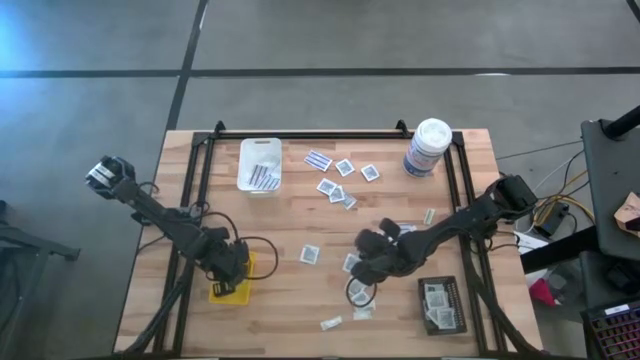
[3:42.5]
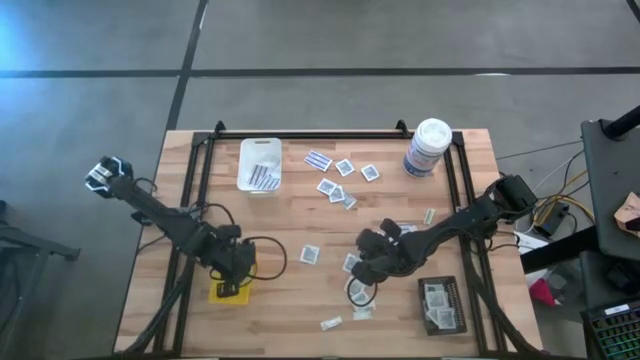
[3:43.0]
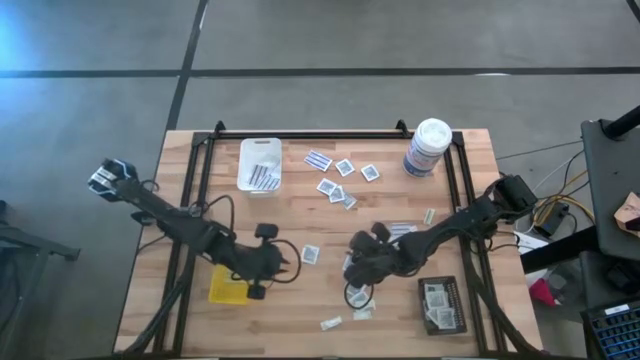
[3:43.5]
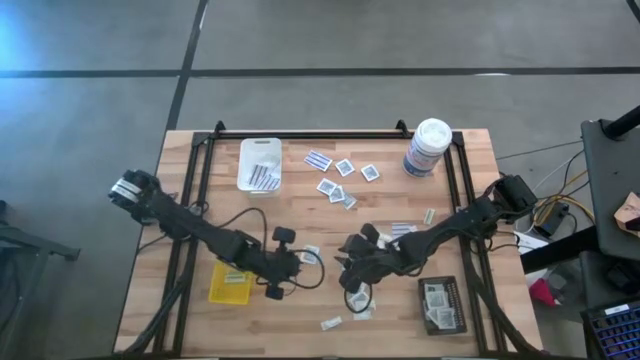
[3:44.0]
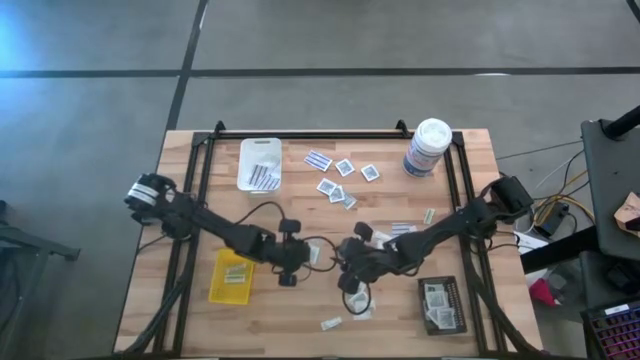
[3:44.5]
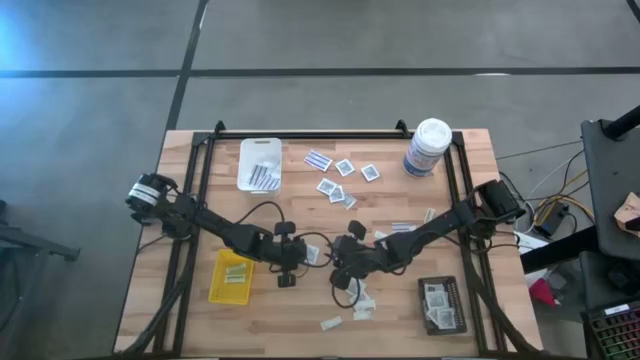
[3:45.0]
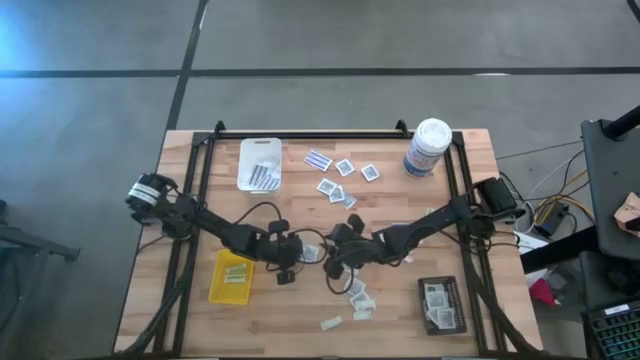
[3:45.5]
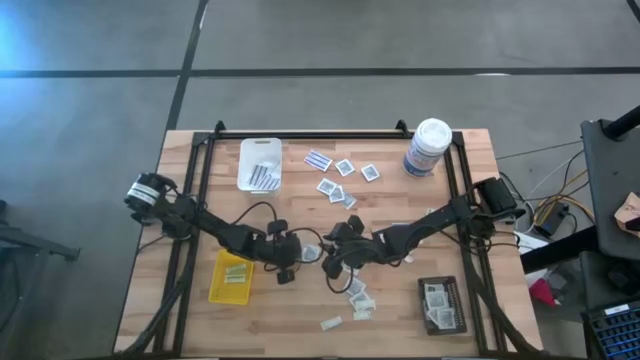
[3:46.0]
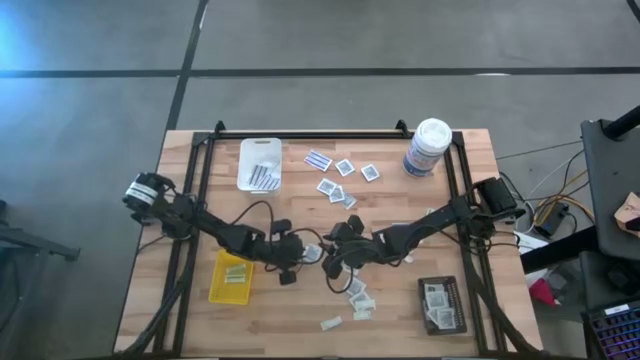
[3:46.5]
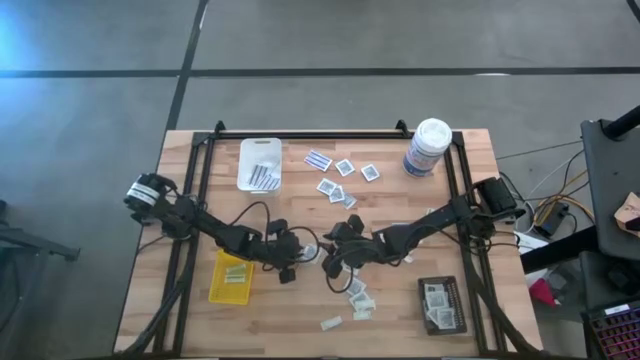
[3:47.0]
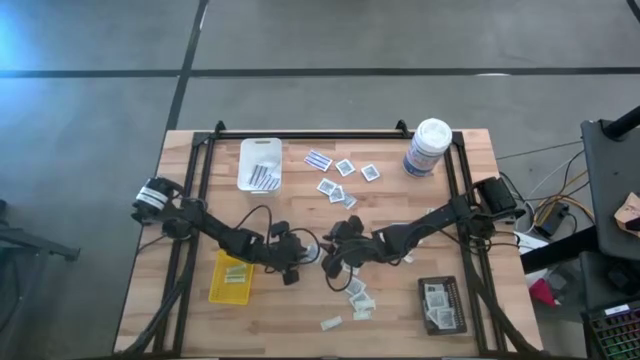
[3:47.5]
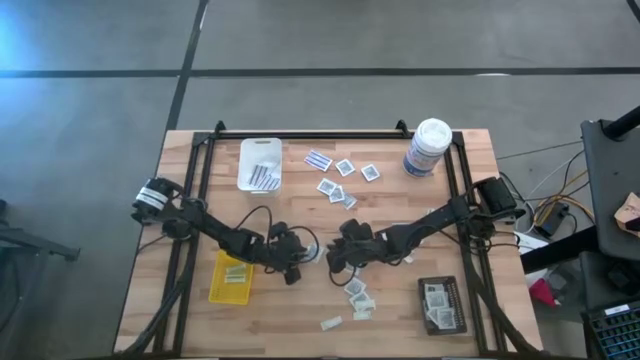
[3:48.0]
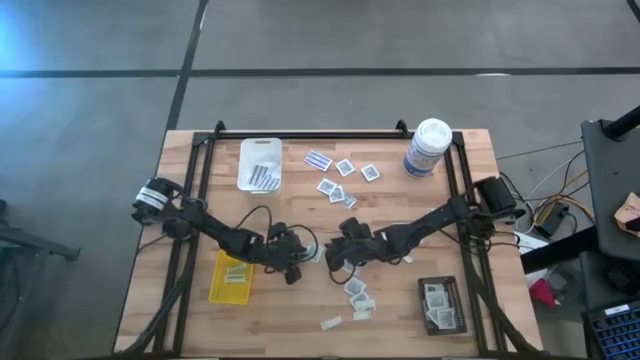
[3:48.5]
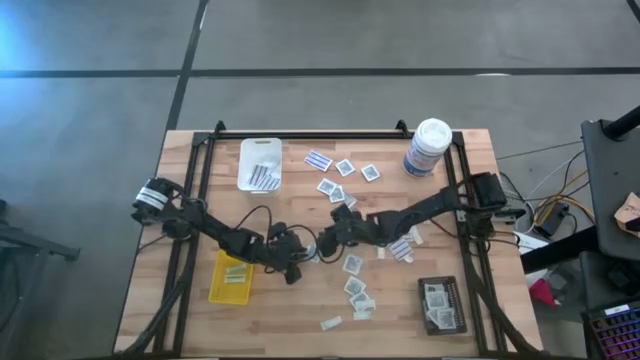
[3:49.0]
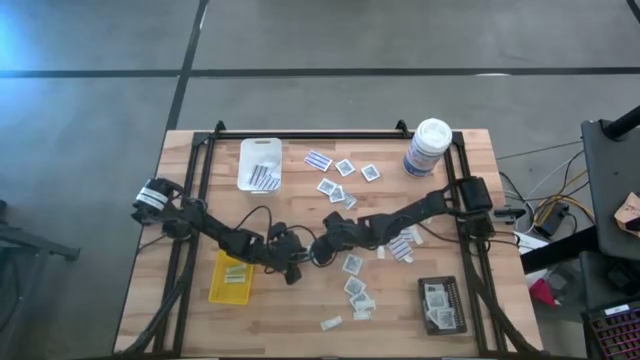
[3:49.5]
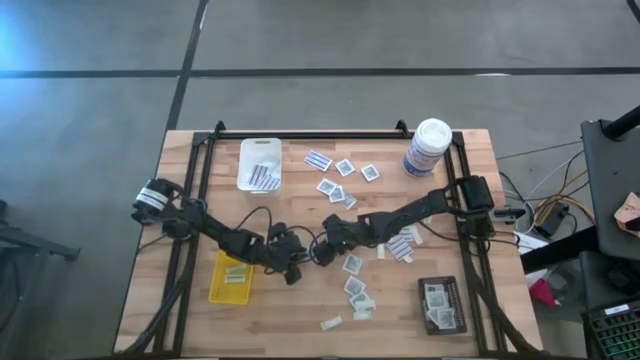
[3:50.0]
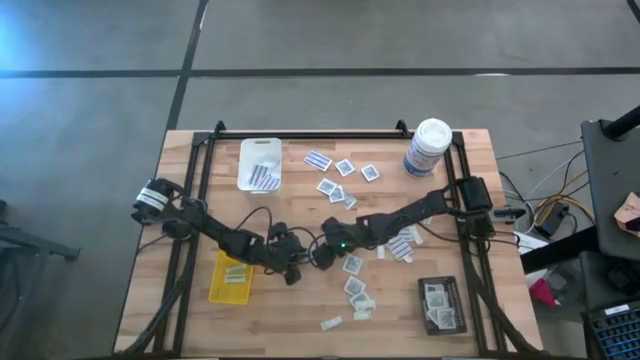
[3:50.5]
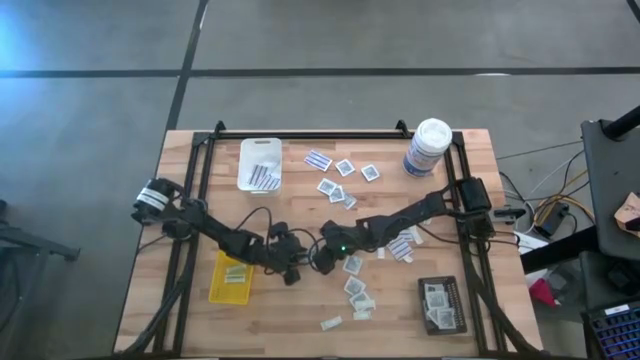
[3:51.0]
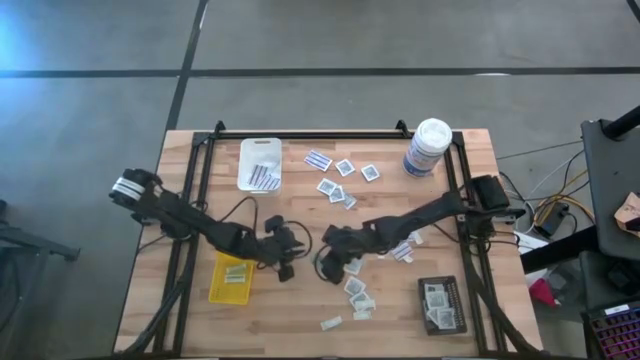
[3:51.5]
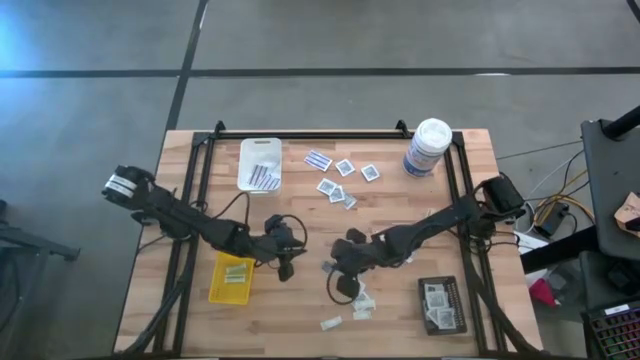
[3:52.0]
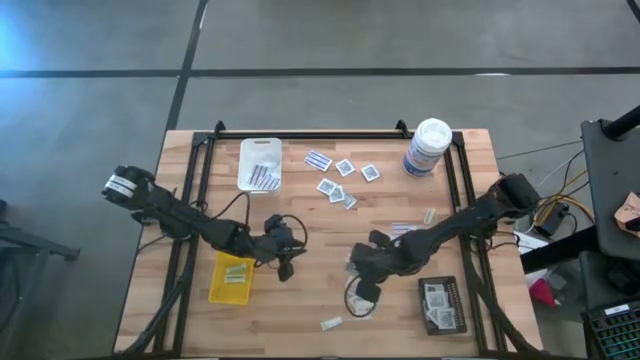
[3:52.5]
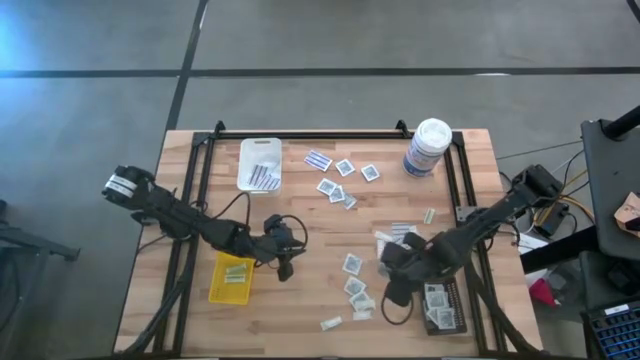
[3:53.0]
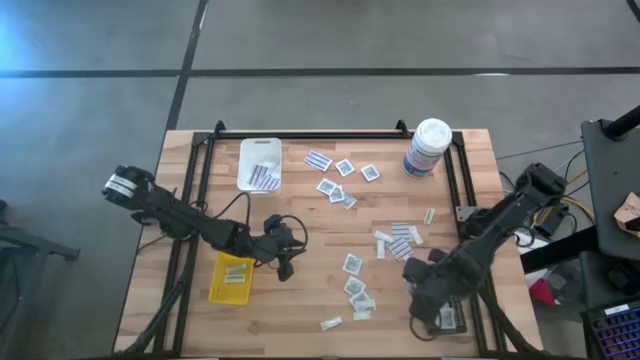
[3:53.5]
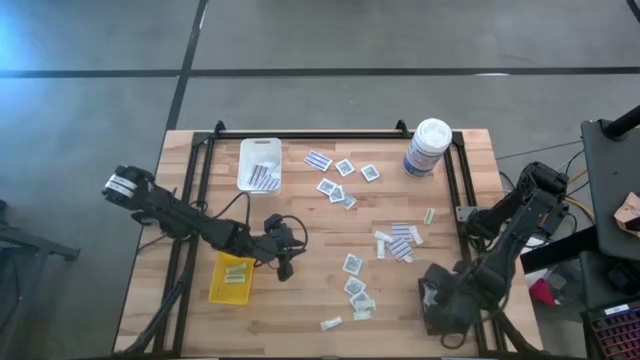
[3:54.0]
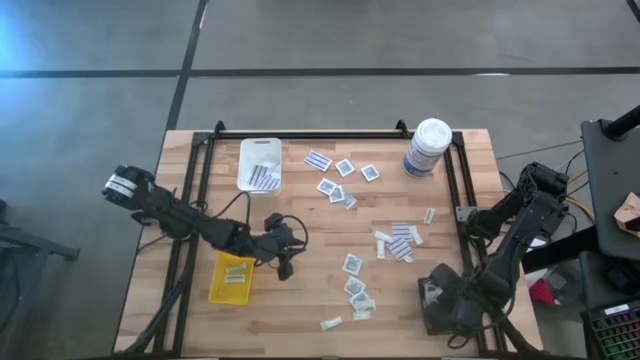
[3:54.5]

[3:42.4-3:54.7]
Task: Pick & Place First Aid Supplies
Put the towelette pack into the black bin

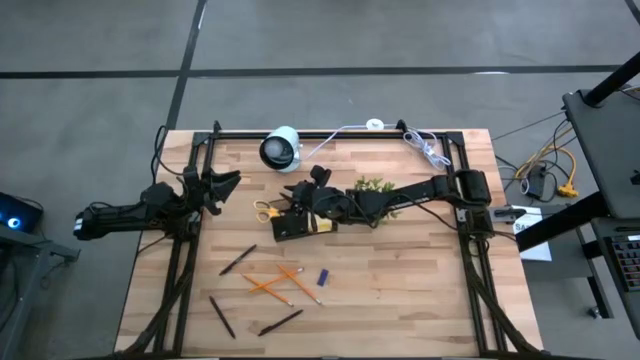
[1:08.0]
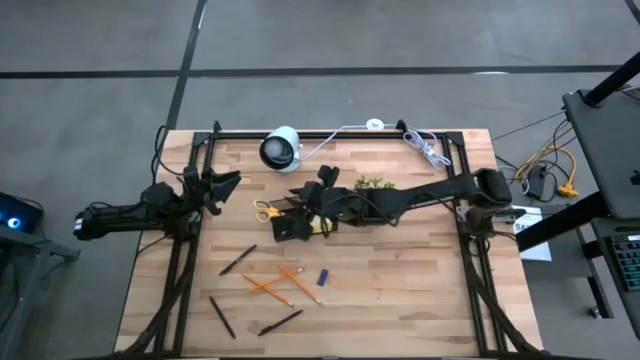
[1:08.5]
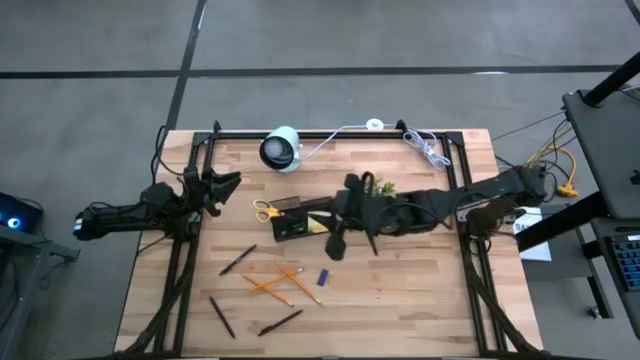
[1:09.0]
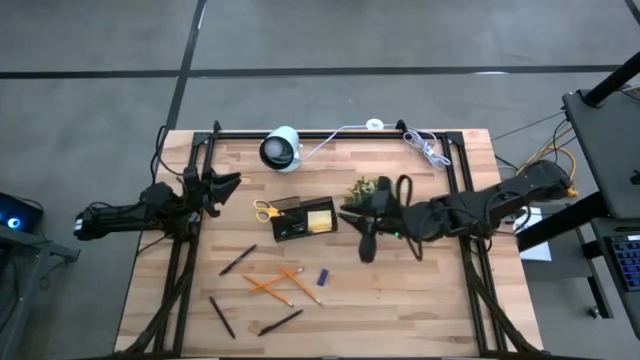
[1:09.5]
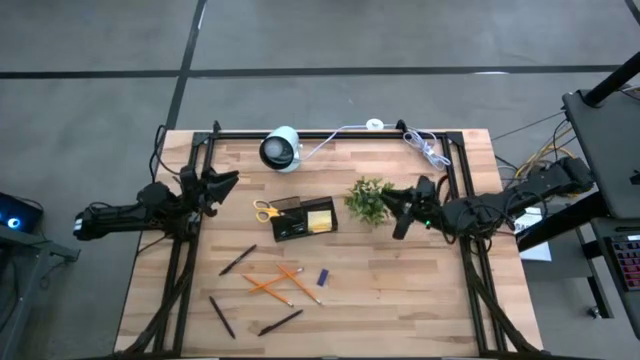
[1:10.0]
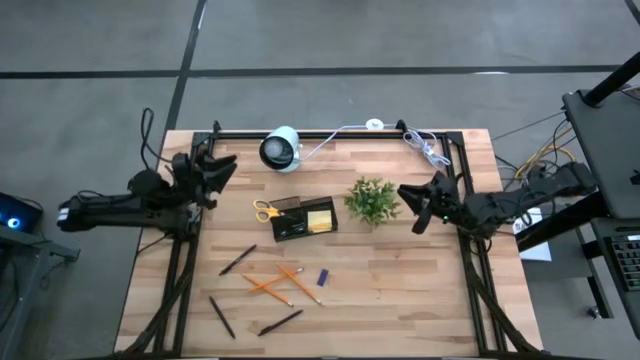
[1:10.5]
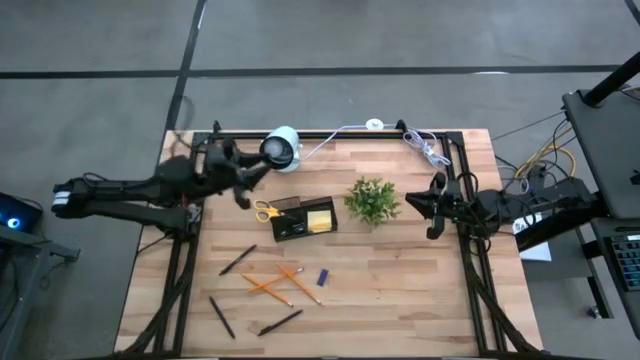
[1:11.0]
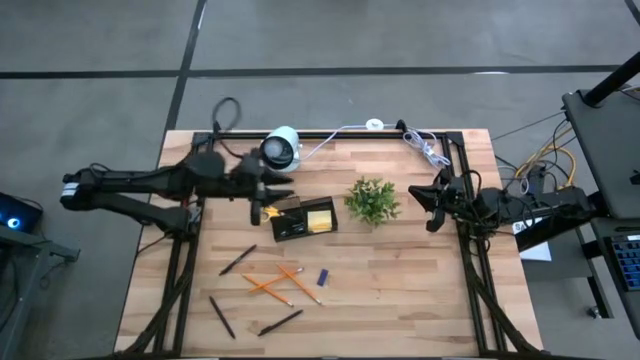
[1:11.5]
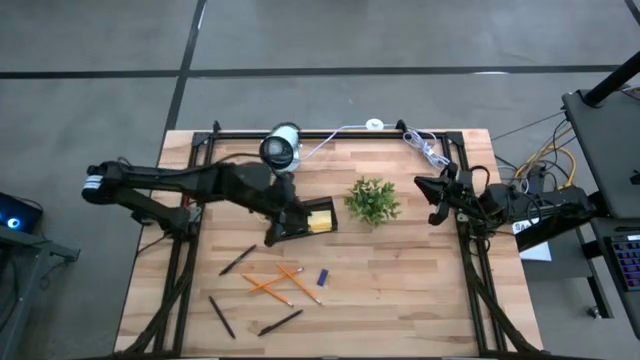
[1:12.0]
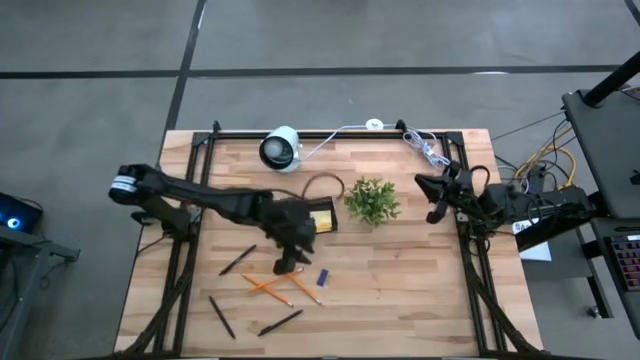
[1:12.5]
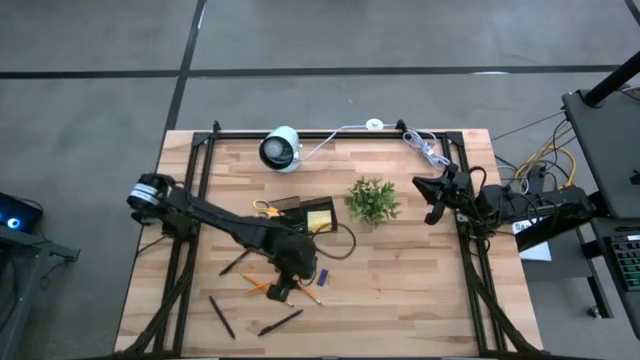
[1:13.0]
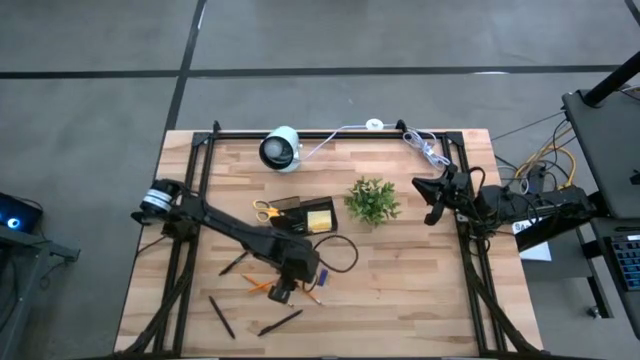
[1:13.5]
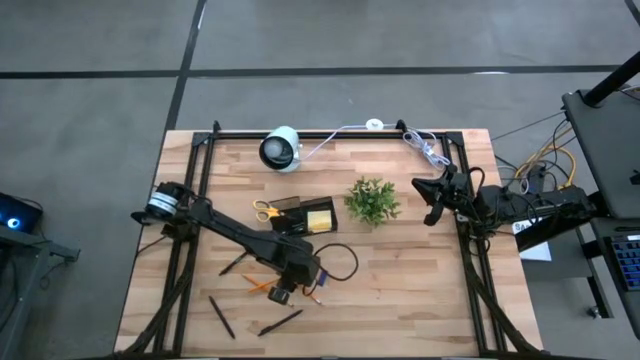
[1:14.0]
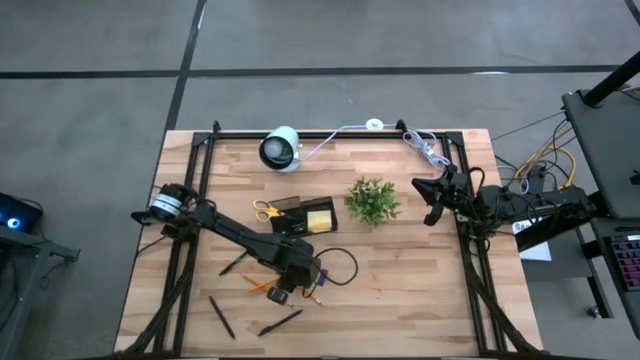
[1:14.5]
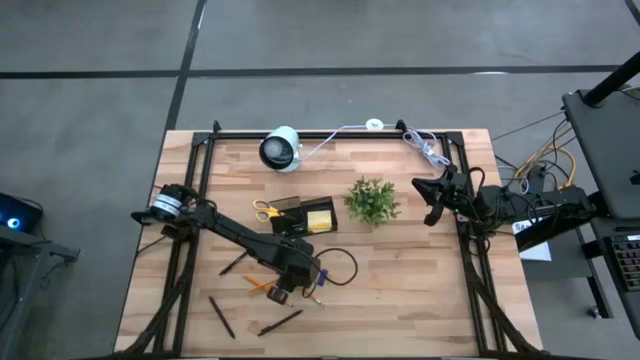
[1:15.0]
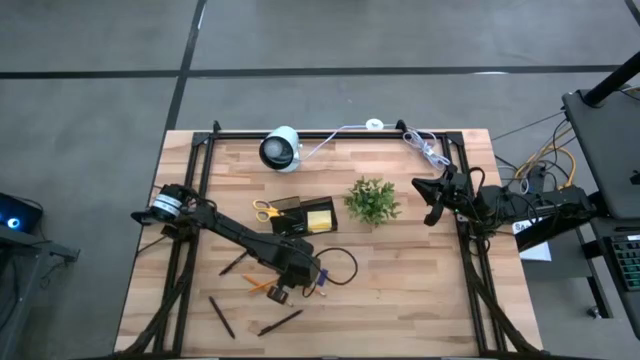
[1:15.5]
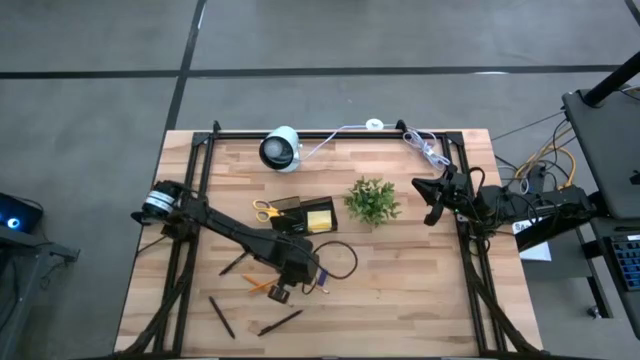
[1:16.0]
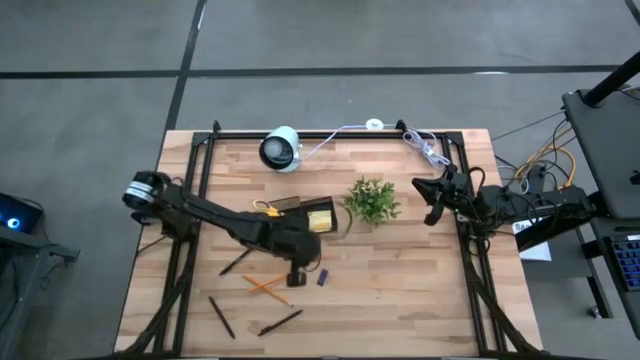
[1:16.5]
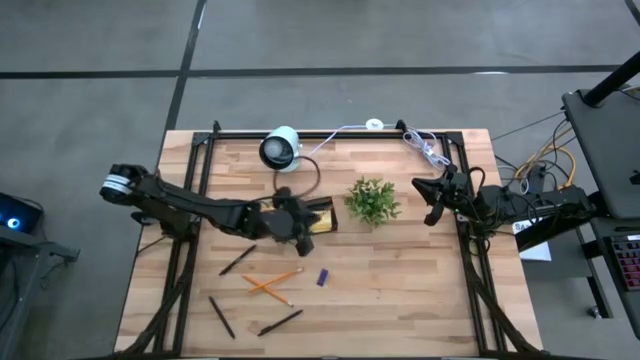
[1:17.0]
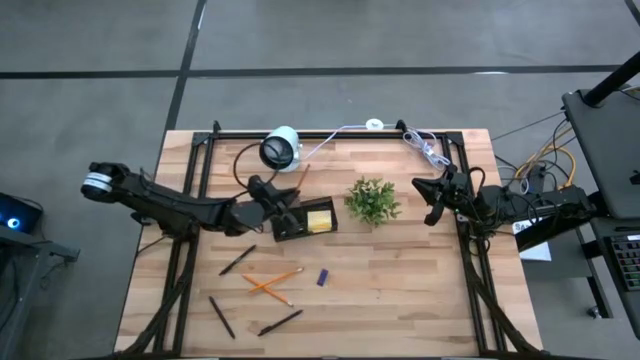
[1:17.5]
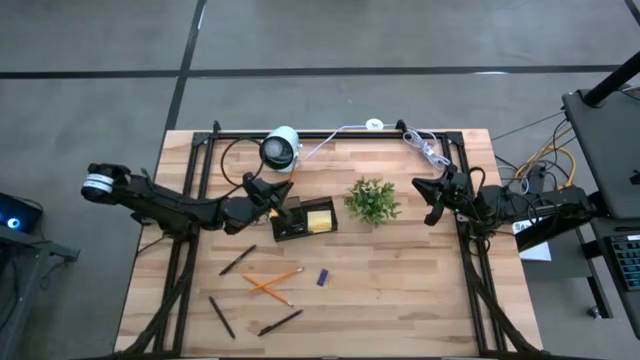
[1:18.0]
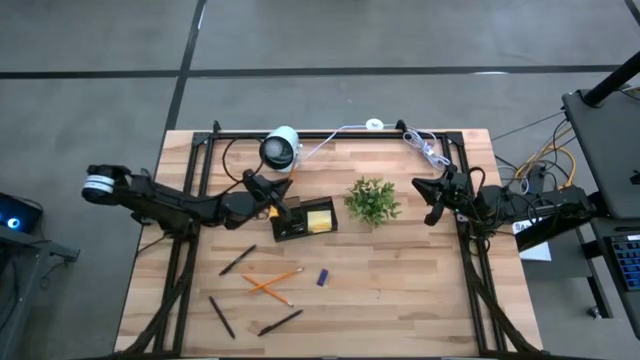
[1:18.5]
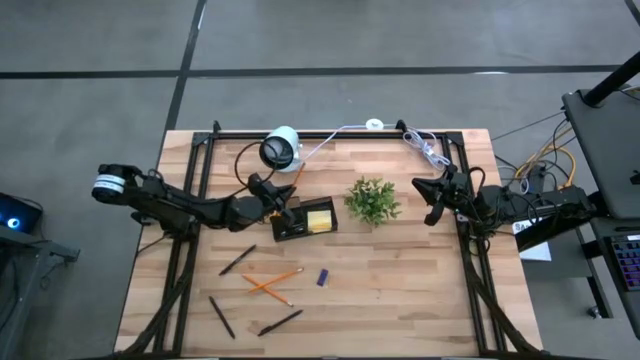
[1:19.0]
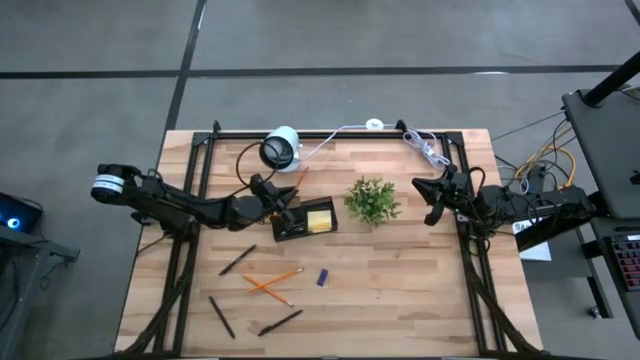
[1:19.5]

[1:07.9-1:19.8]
Task: Pick and place office supplies into organizer
Put the right yellow pencil in the black desk organizer
